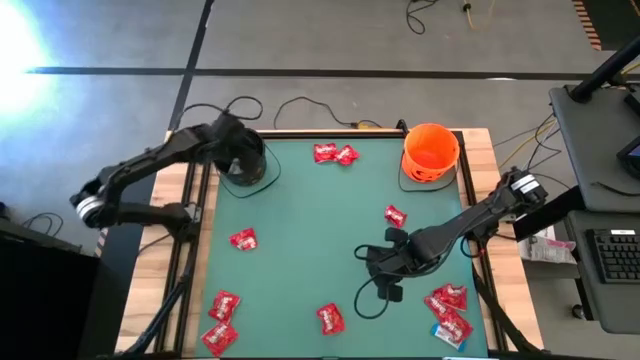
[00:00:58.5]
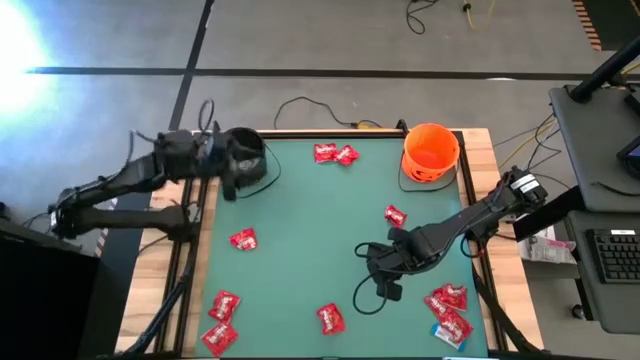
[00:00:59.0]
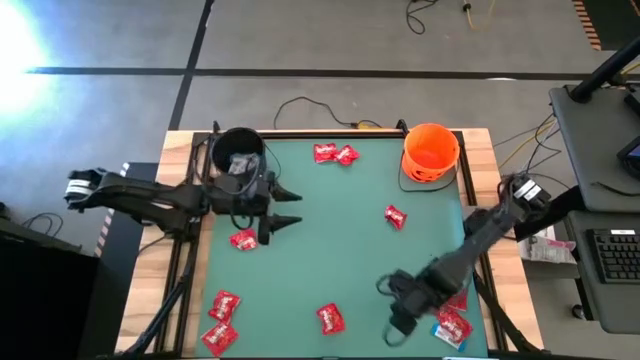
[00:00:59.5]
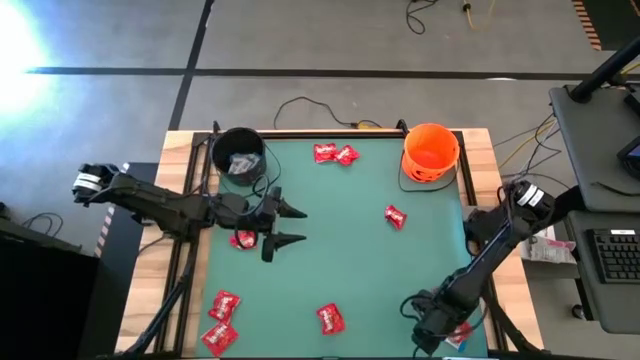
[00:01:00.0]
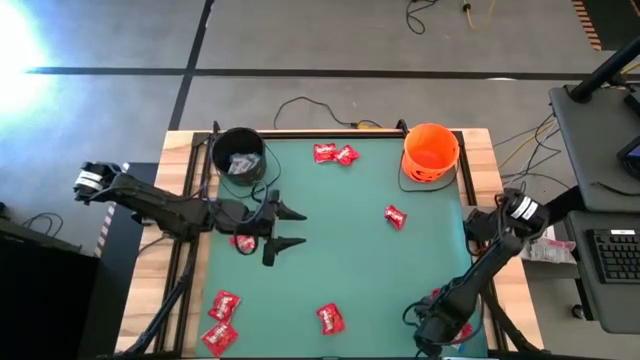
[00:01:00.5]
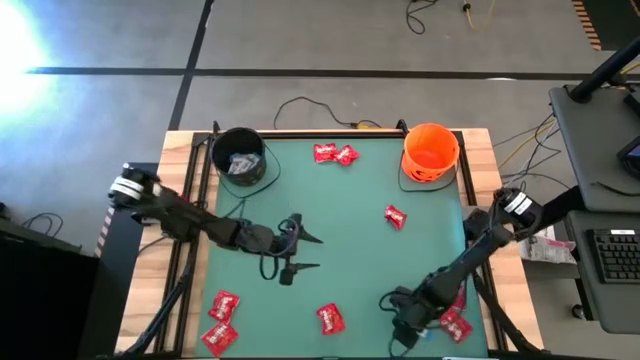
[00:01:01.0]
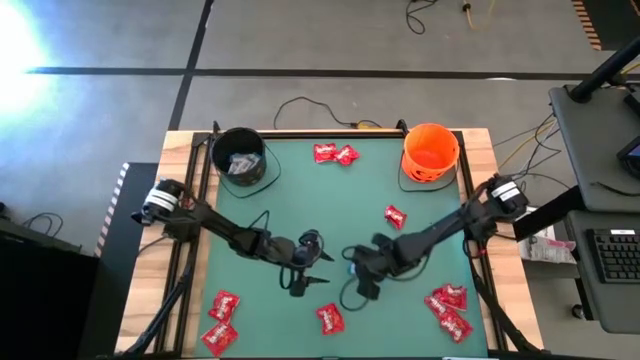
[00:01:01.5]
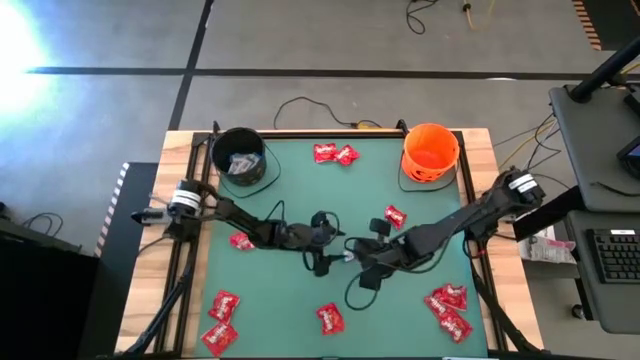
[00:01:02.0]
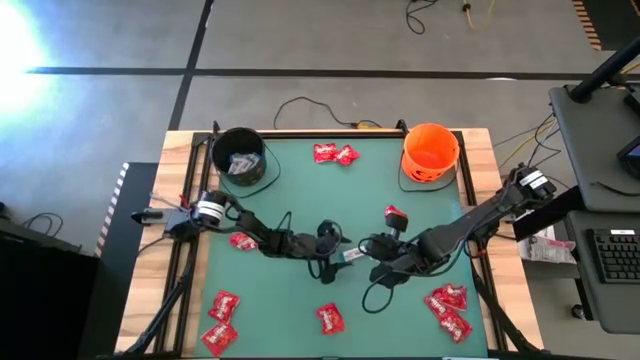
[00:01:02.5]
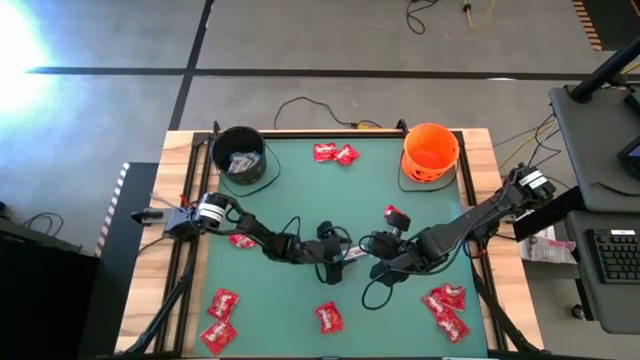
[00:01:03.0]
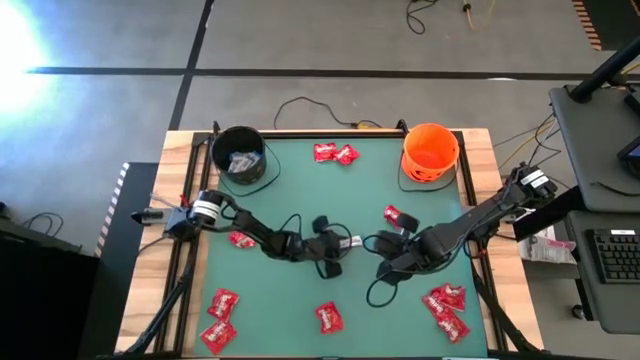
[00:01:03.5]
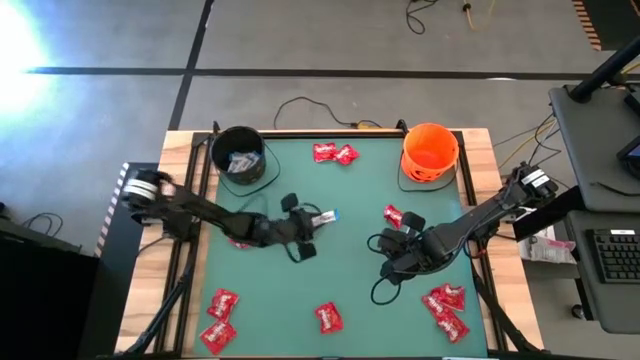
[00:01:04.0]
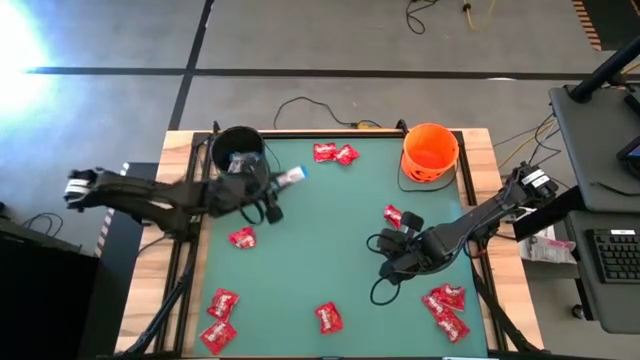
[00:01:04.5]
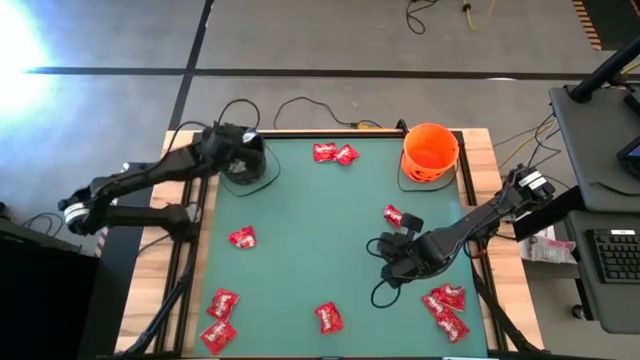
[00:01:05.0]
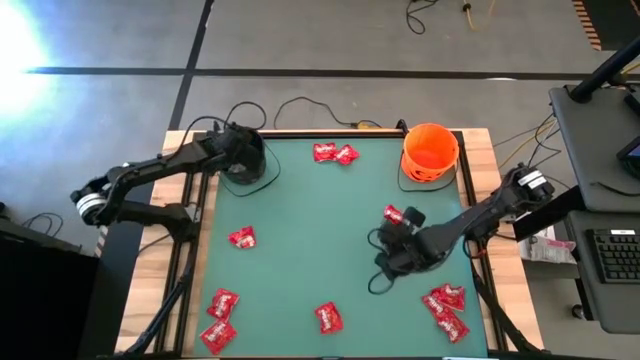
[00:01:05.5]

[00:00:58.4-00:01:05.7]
Task: Sort candy by brand, put in halloween buckets
Put the white chocolate into the black bucket

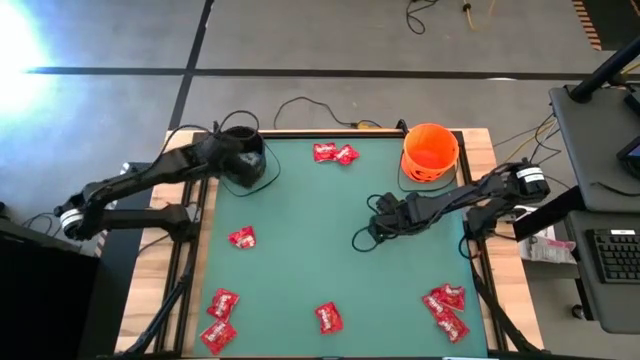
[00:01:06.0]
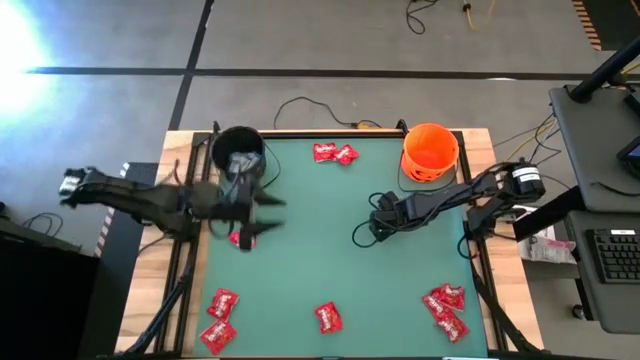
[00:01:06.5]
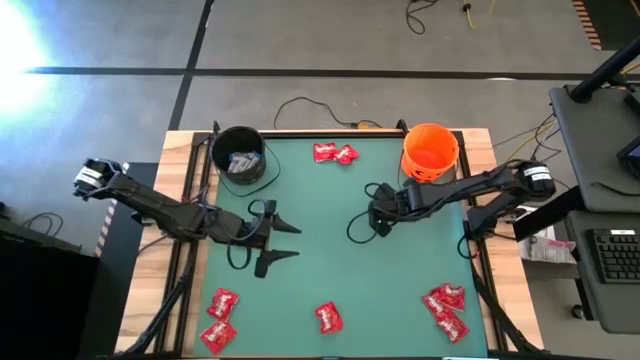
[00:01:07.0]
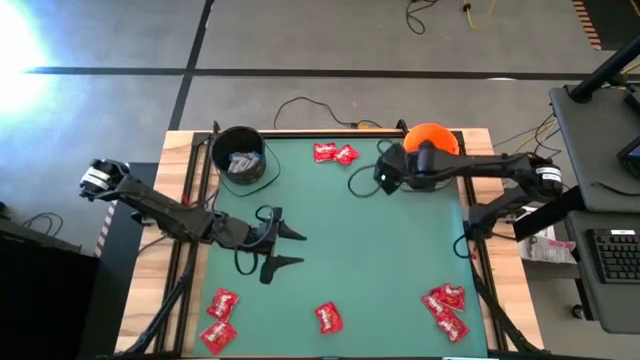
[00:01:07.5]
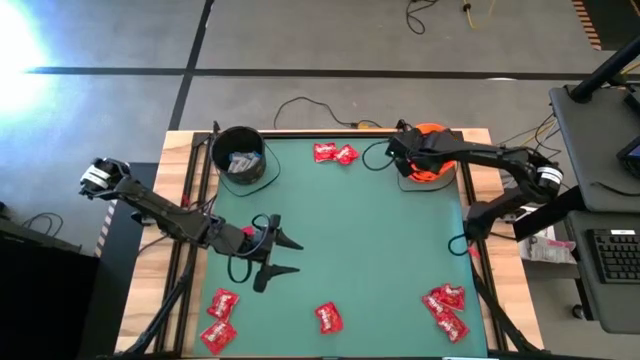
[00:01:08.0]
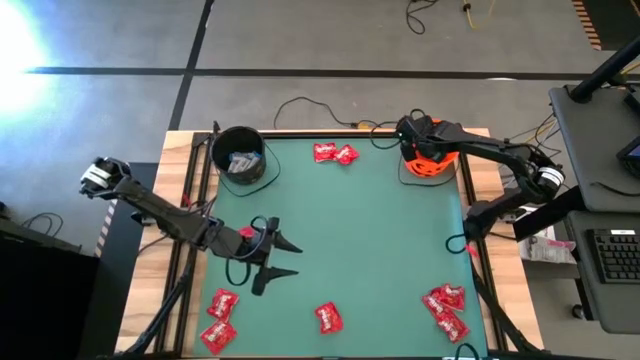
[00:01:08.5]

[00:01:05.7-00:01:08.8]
Put the red candy into the orange bucket

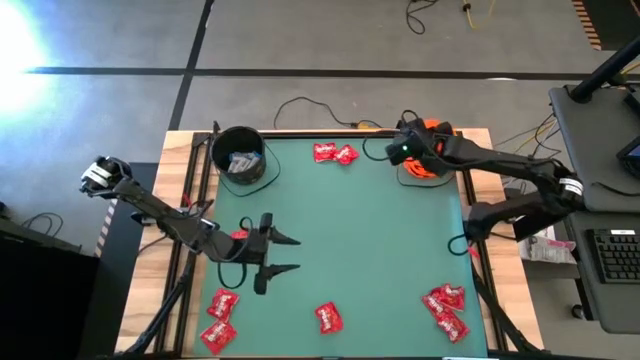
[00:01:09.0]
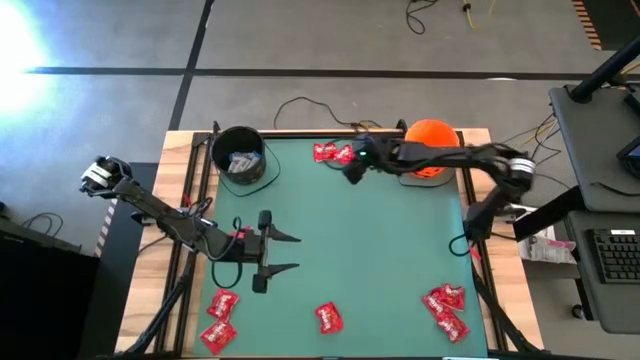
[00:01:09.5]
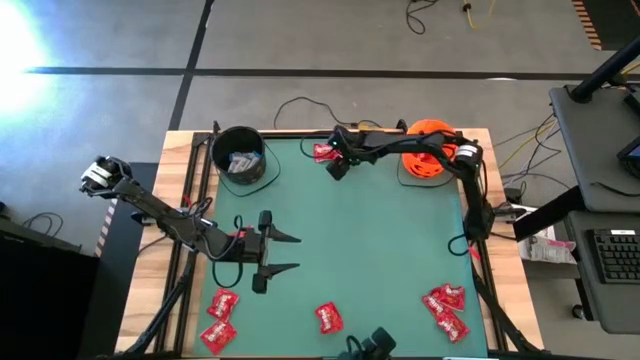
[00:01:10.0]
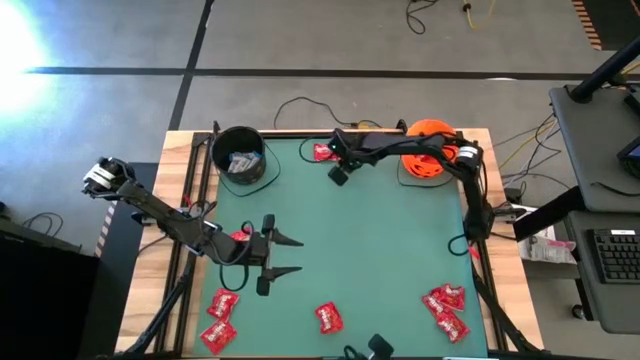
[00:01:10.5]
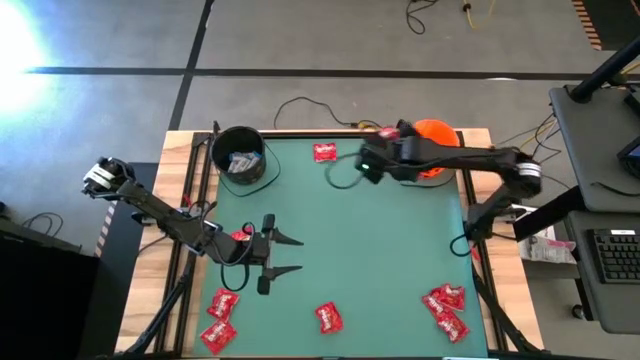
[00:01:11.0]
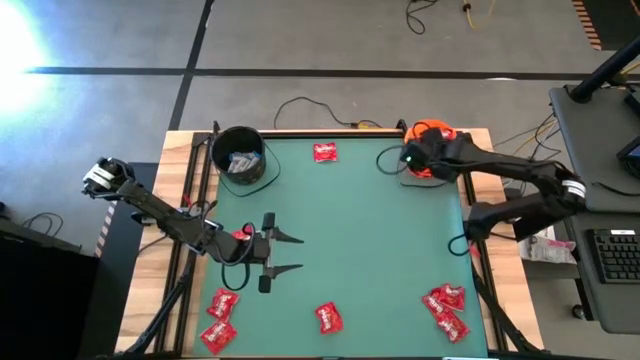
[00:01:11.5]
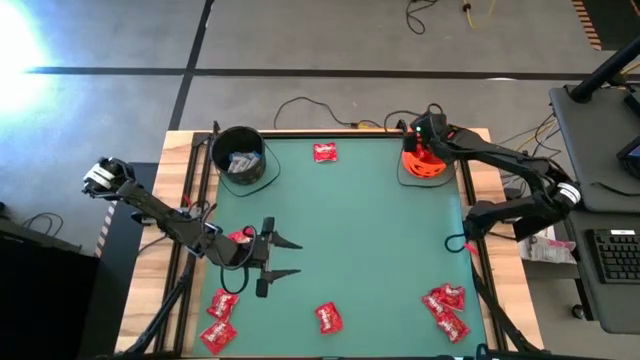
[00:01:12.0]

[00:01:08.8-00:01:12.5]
Put the red candy into the orange bucket

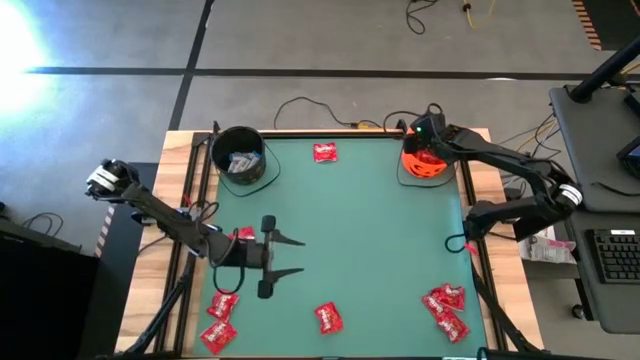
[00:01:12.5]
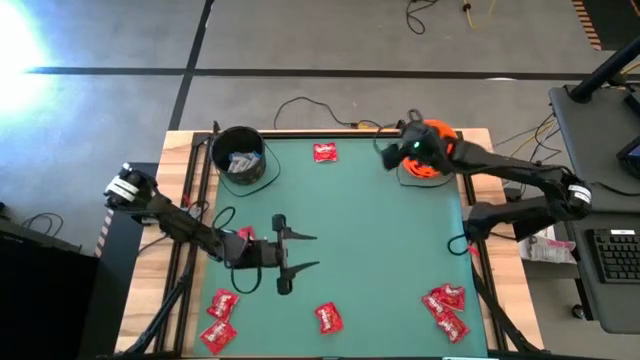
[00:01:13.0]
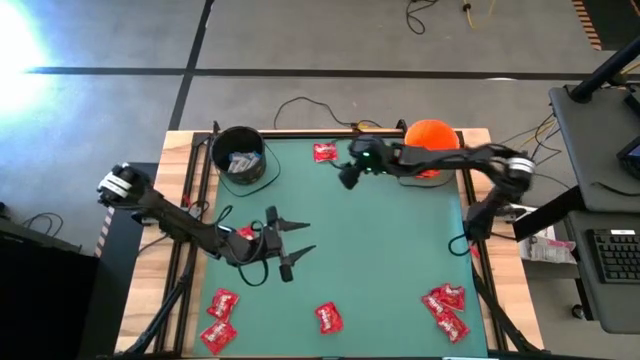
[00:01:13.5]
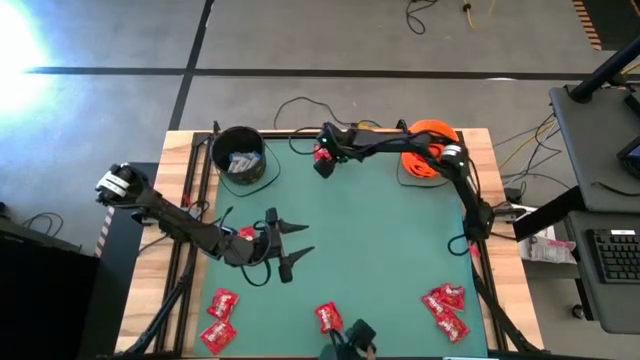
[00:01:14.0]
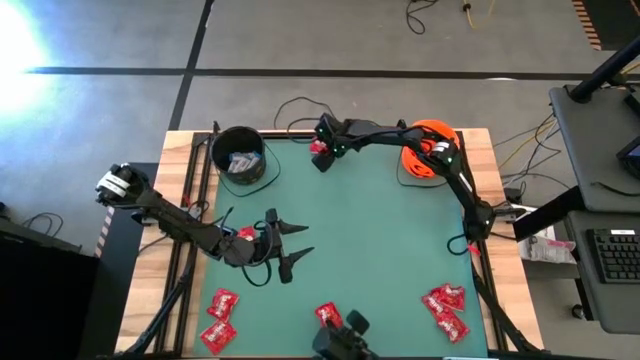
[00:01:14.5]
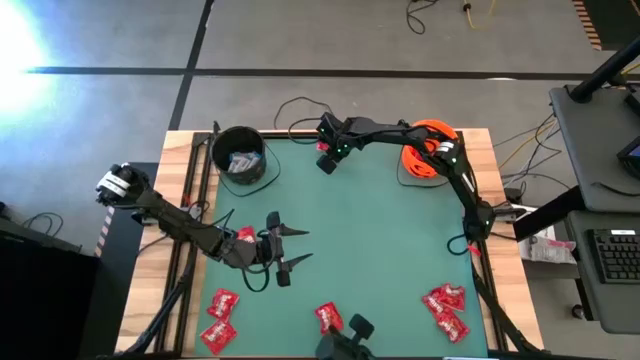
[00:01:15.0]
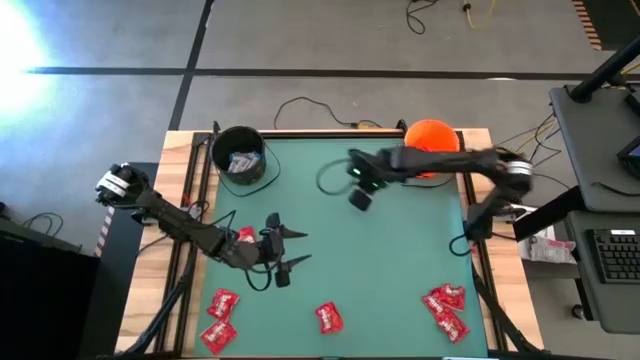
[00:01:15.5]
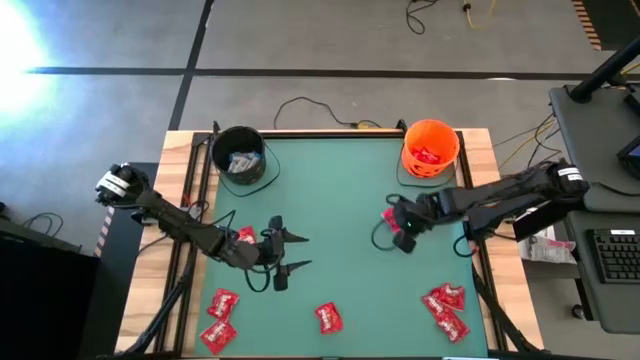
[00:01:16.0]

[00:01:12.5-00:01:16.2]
Put the red candy into the orange bucket

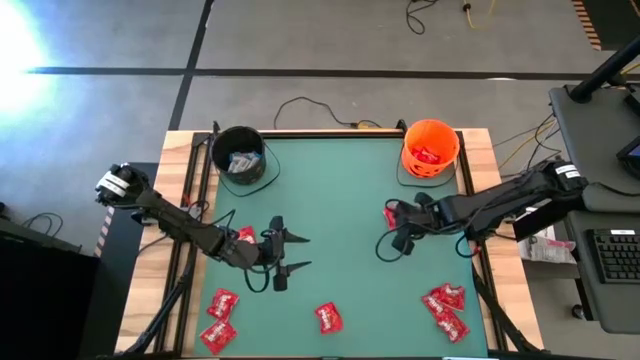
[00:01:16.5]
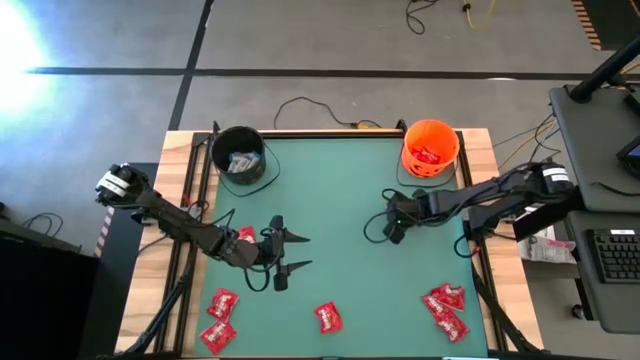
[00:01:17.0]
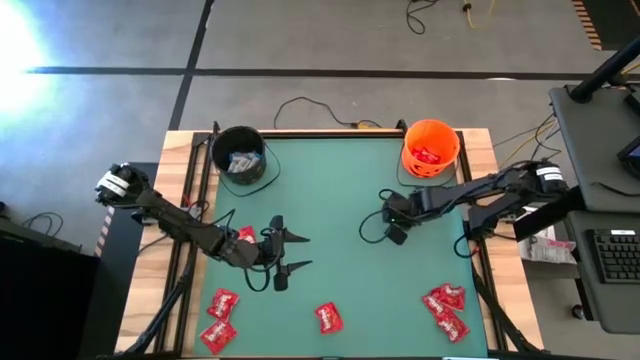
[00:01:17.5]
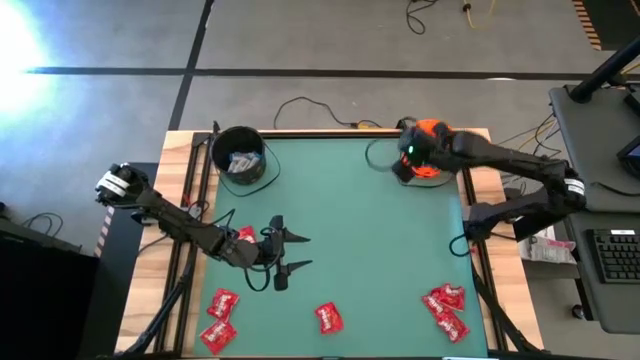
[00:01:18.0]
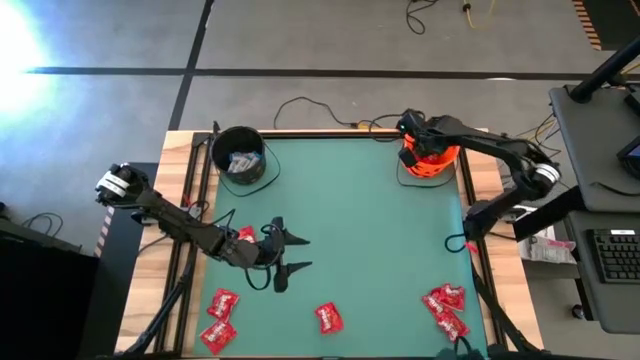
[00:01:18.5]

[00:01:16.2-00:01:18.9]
Put the red candy into the orange bucket
